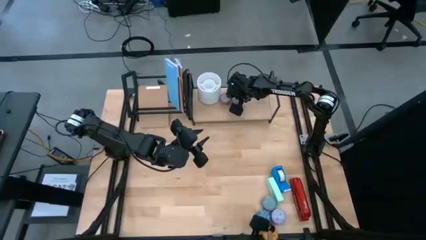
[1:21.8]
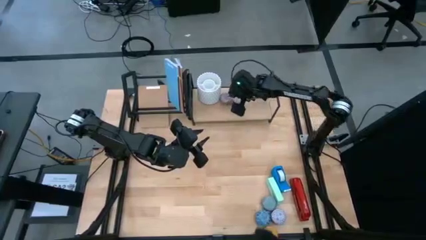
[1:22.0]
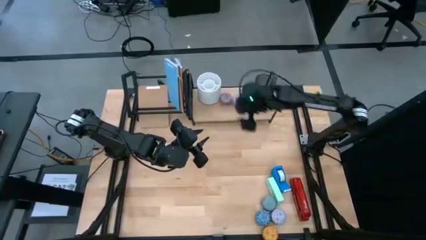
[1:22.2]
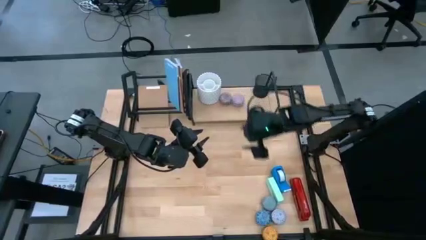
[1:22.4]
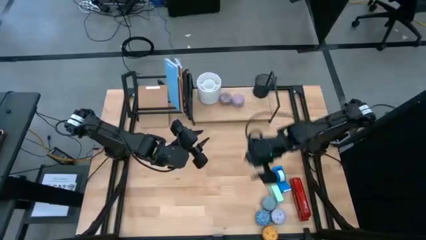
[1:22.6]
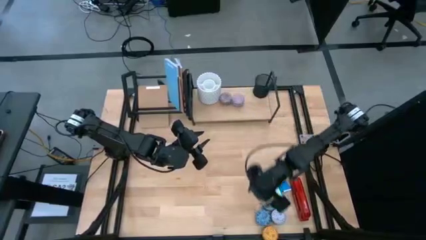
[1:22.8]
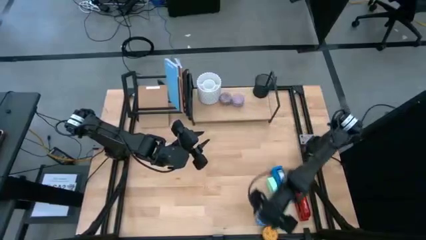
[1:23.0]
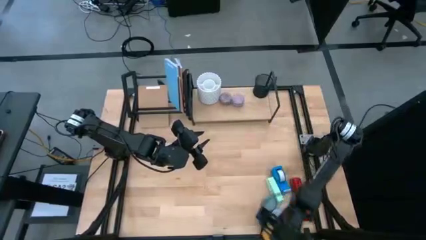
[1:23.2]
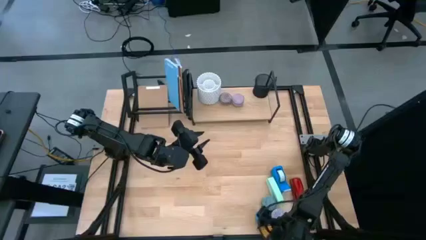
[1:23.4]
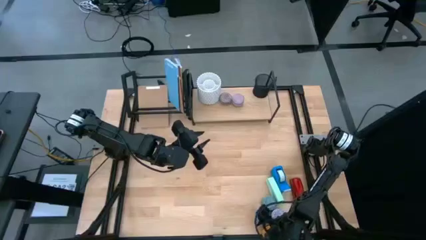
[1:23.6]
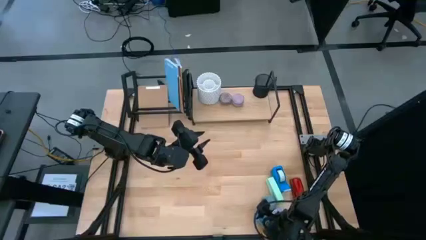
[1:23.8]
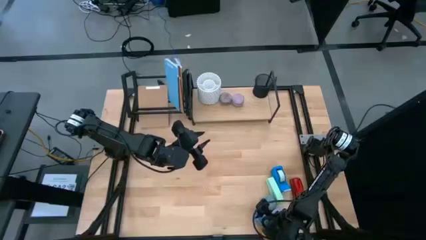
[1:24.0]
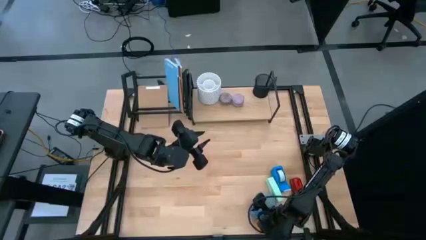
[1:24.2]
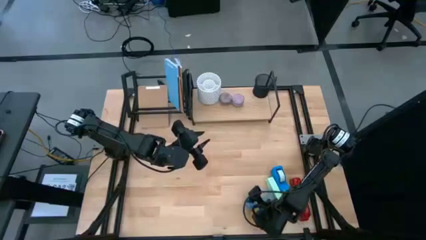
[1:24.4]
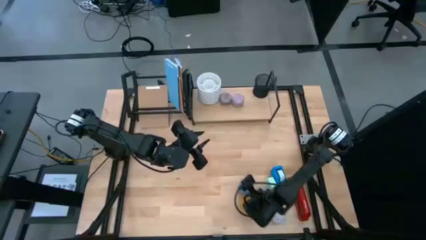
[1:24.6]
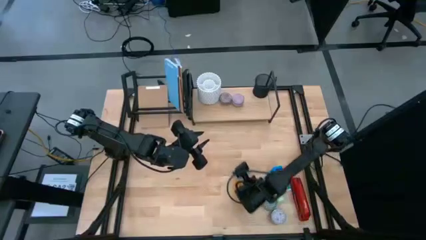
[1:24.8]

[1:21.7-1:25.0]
Task: Stock shelves
Adjust the yellow scented candle

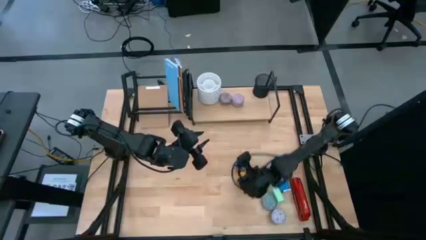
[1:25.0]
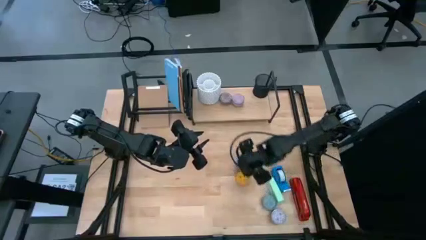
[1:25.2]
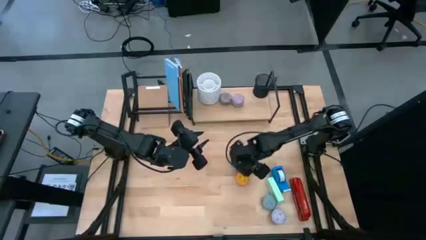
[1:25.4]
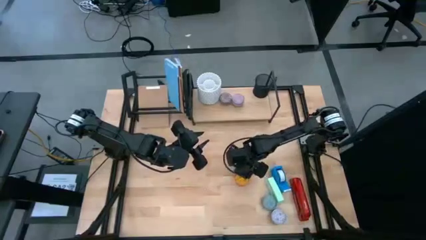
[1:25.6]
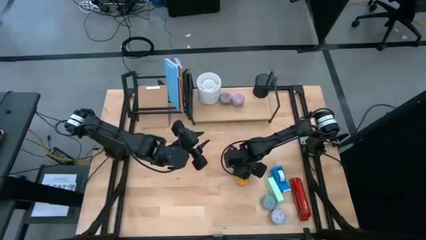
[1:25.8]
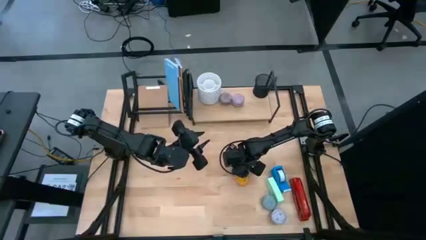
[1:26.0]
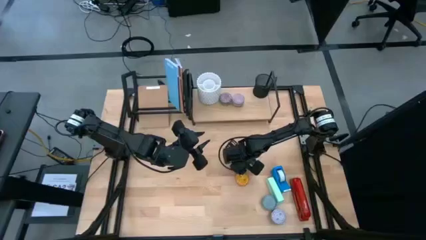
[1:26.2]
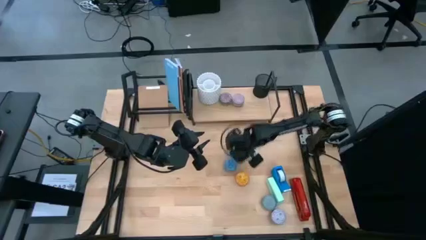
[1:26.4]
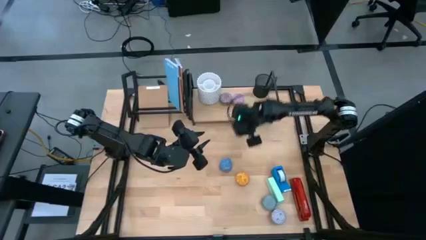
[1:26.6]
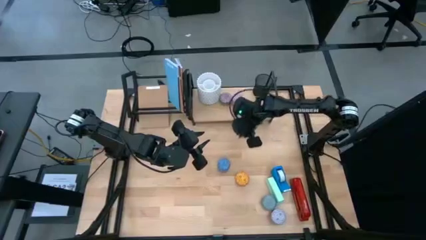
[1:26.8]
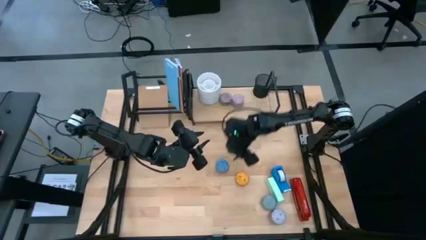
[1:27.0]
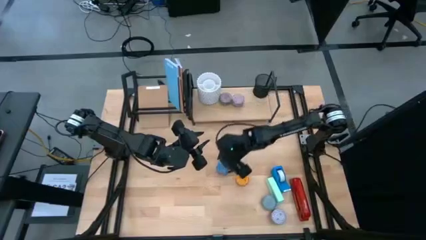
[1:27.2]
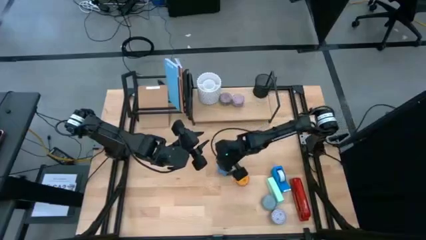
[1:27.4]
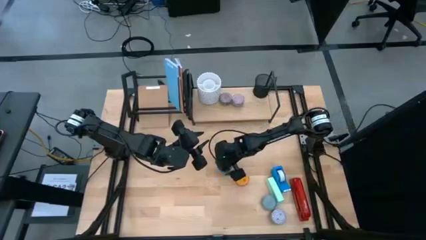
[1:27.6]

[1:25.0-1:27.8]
Put the blue scented candle on the shelf

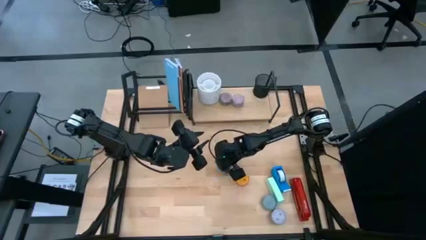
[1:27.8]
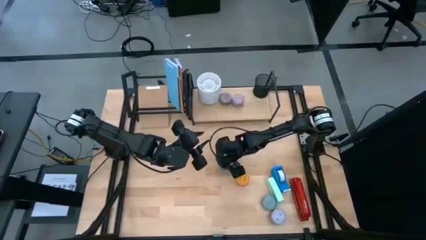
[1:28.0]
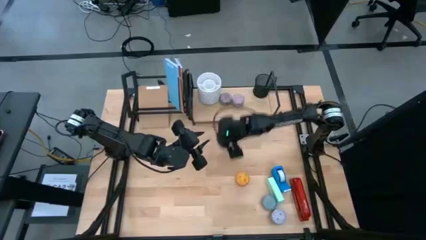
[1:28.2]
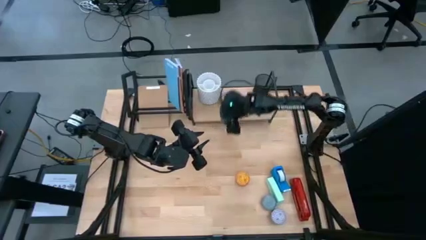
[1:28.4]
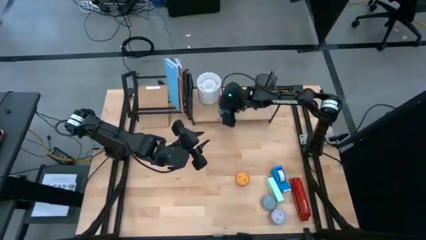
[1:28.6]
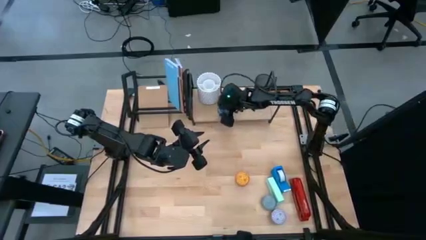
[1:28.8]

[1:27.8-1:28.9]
Put the blue scented candle on the shelf

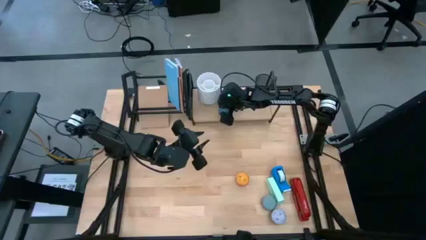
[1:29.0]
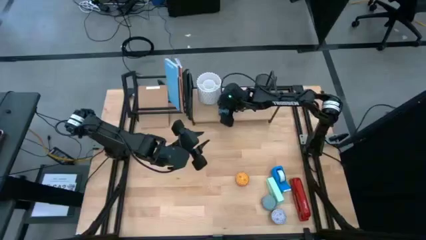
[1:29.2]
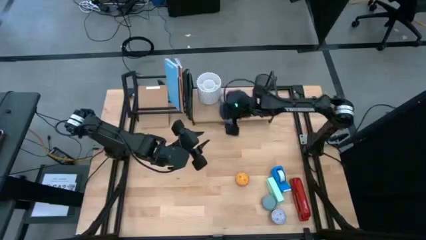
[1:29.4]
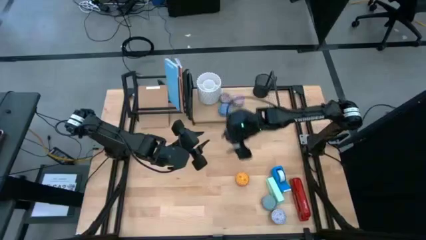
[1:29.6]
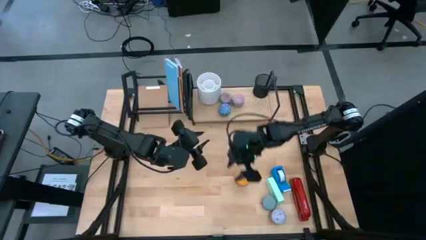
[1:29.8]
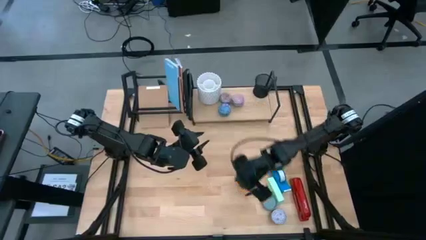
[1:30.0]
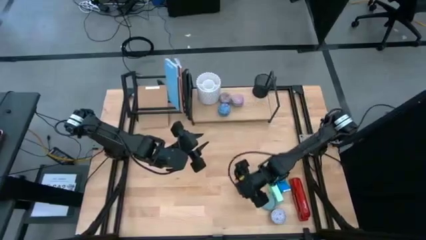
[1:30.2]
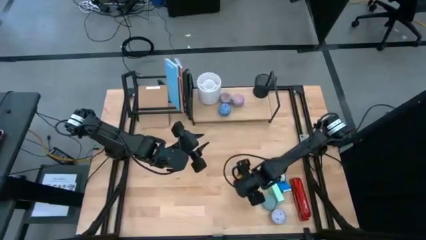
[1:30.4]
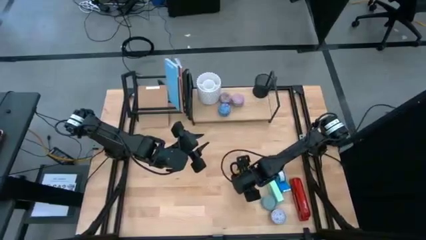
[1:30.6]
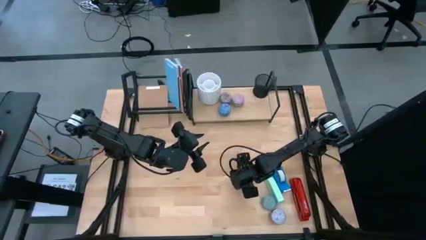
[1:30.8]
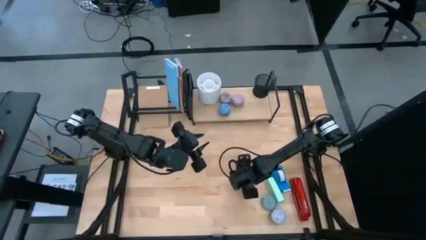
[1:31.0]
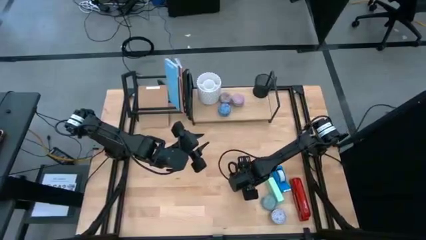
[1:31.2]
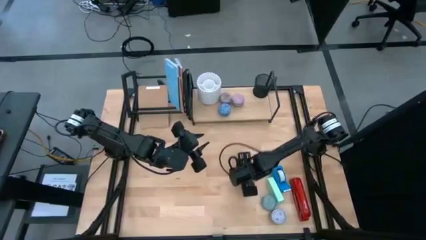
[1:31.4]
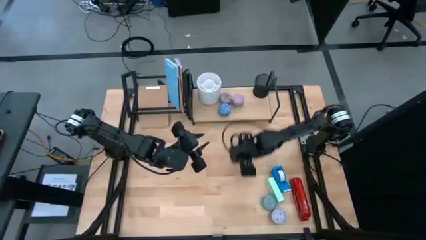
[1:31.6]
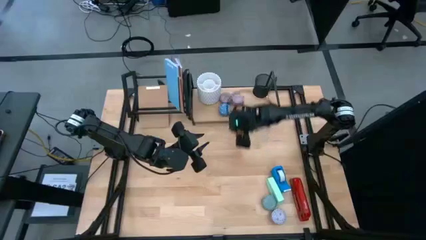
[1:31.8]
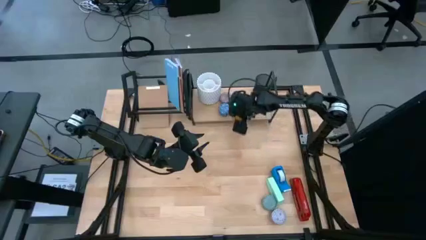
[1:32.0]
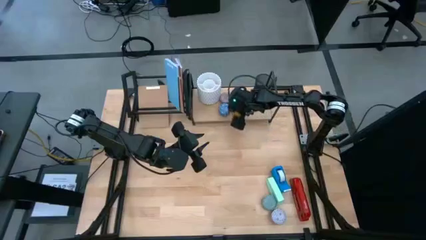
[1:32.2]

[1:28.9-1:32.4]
Put the yellow scented candle on the shelf

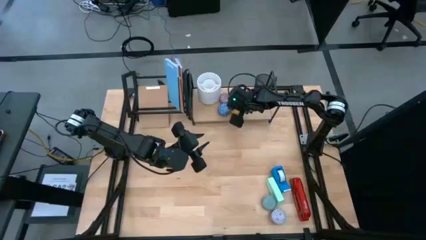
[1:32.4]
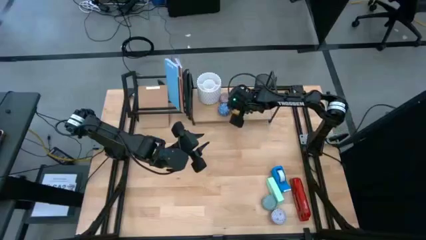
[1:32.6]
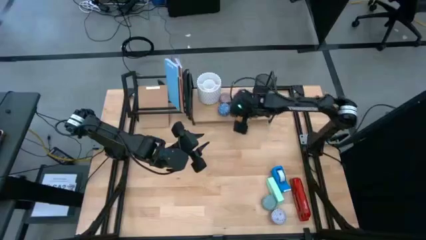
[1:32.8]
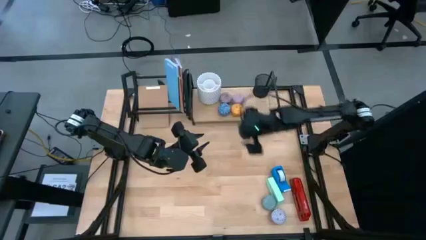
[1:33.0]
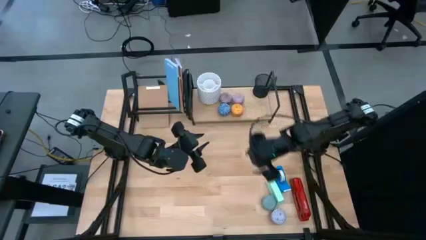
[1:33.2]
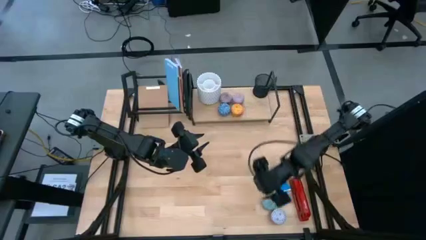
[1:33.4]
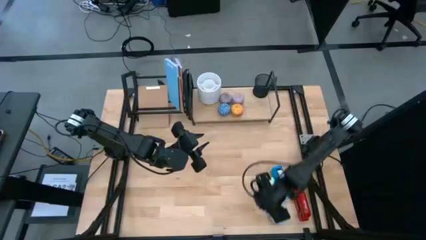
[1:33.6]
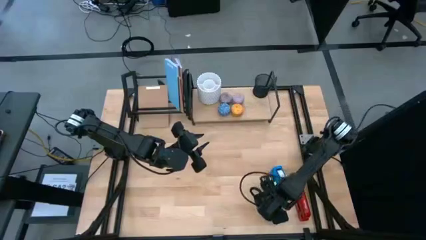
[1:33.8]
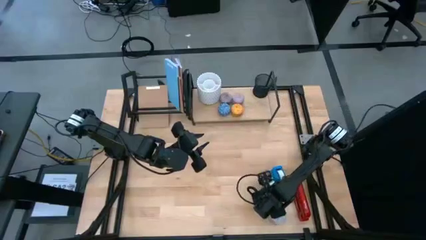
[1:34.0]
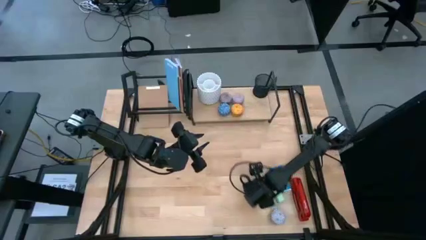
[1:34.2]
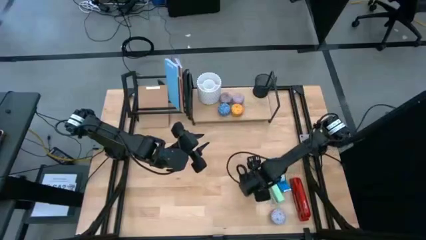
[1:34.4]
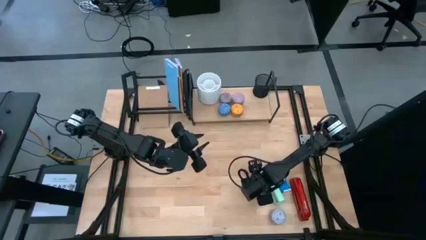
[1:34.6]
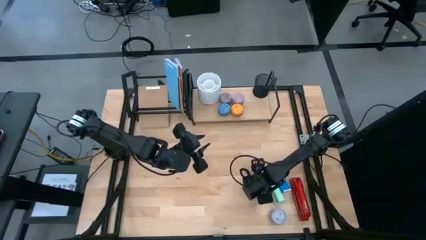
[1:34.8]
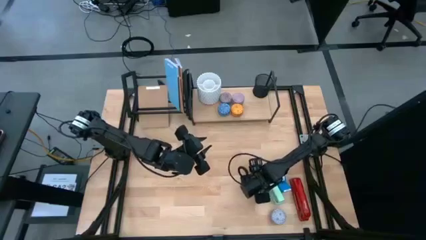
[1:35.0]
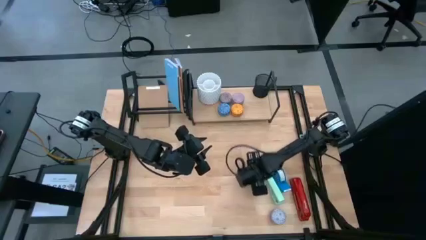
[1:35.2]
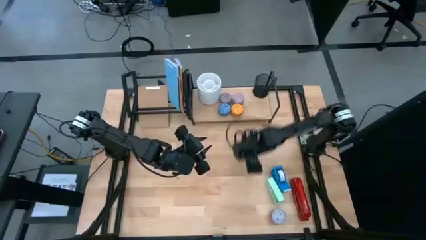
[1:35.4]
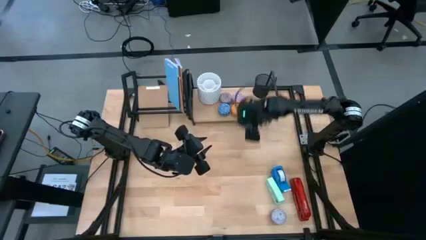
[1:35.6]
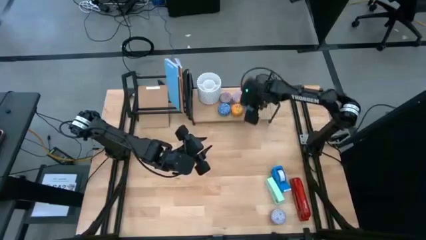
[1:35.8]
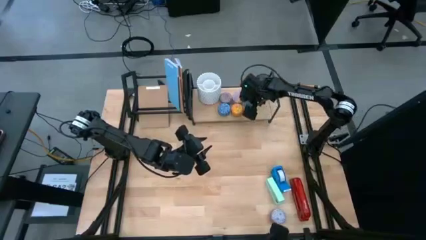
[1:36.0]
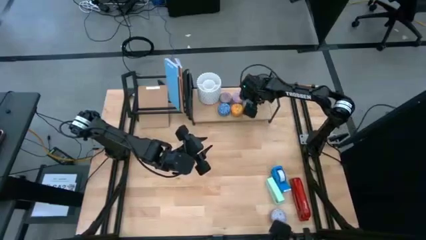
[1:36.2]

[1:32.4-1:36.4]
Put the green scented candle on the shelf

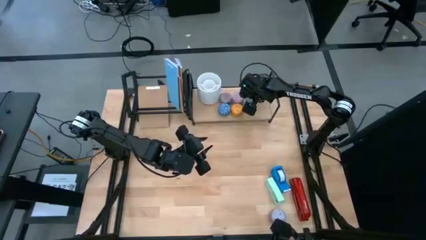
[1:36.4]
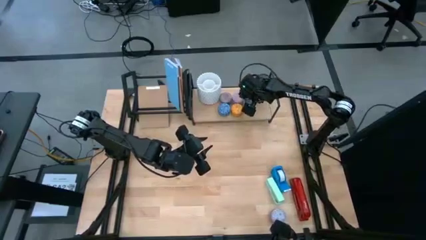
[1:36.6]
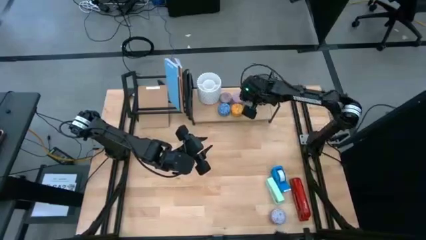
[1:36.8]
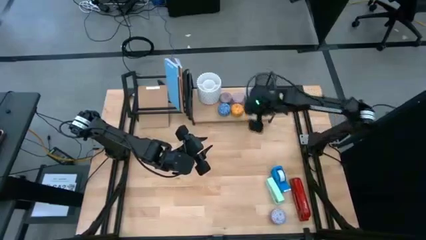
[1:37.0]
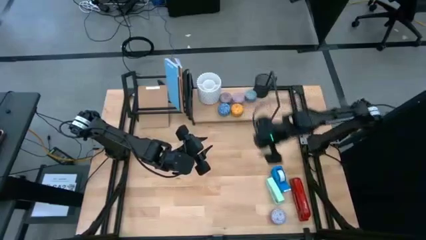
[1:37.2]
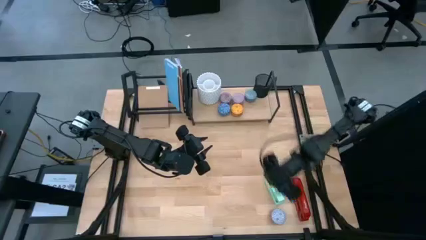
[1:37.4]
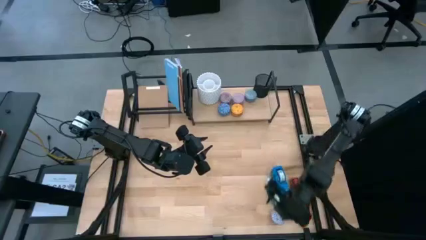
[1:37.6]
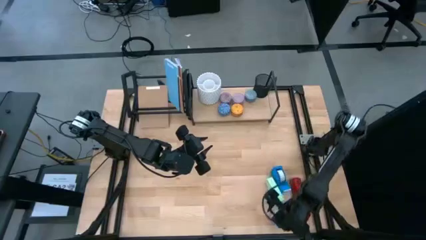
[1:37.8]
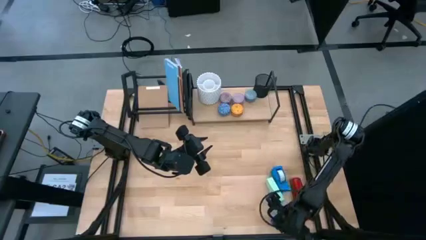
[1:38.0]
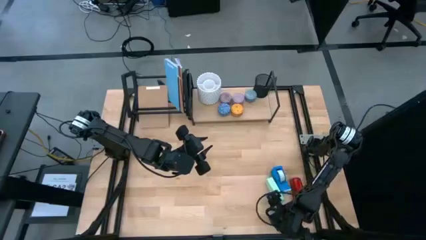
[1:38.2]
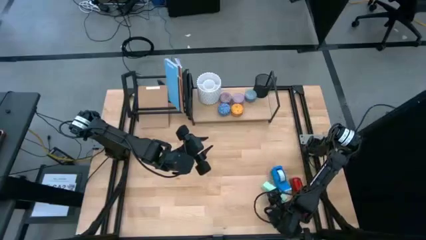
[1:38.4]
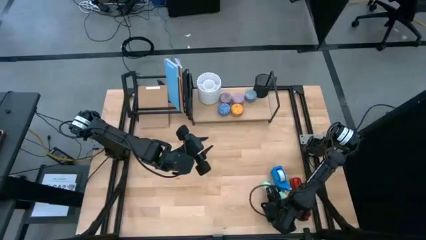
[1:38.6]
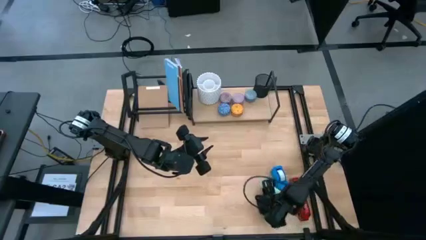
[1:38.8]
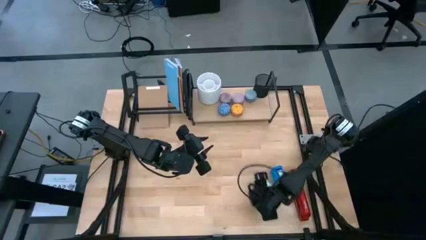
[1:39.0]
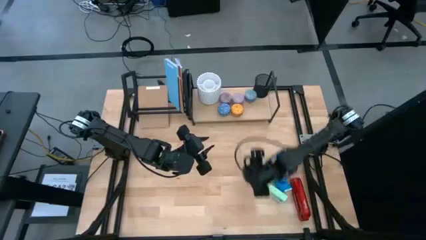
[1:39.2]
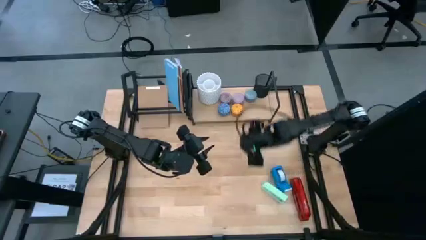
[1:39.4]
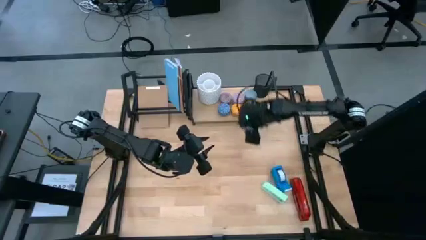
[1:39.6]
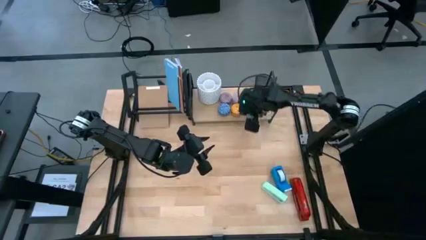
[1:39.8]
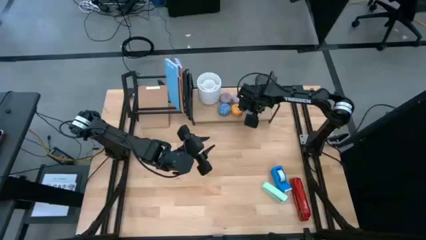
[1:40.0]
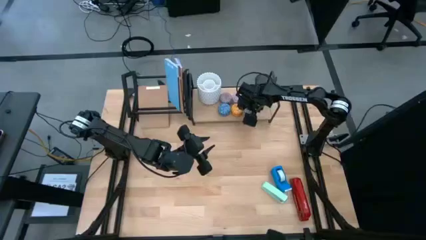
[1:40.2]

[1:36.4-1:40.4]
Put the white scented candle on the shelf
